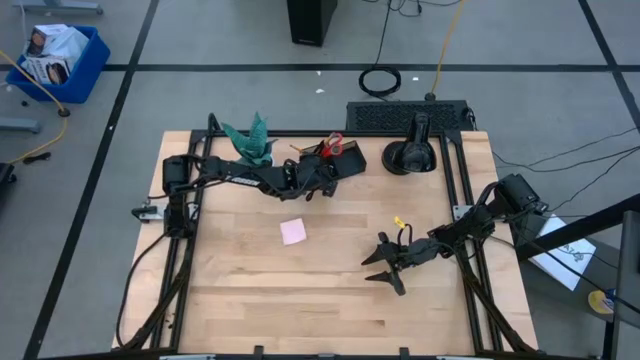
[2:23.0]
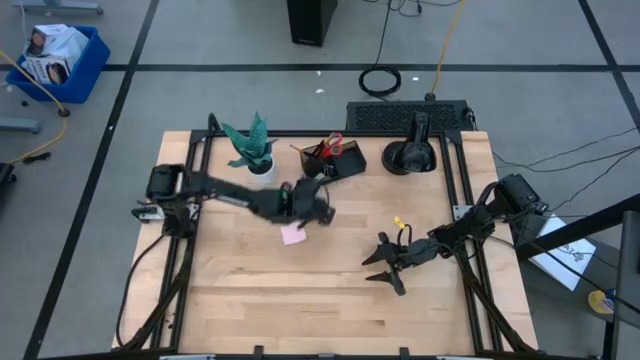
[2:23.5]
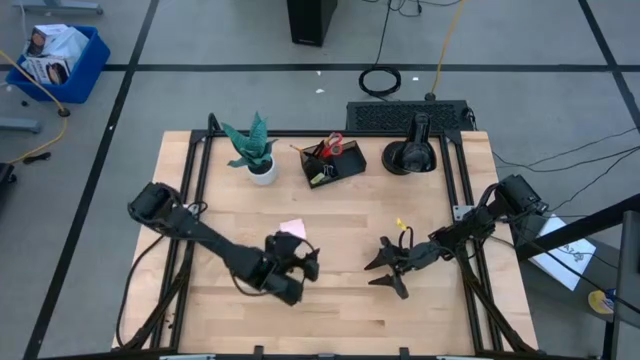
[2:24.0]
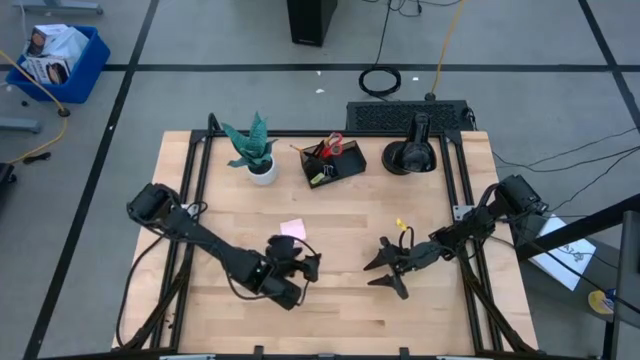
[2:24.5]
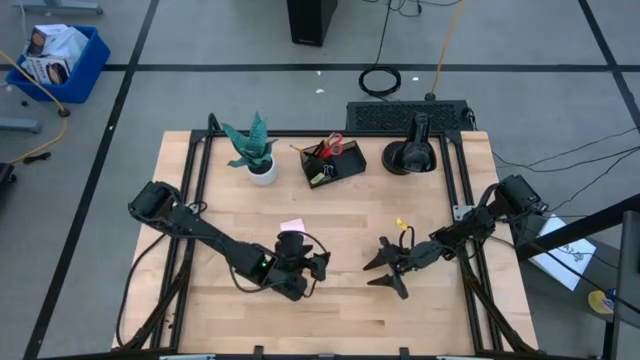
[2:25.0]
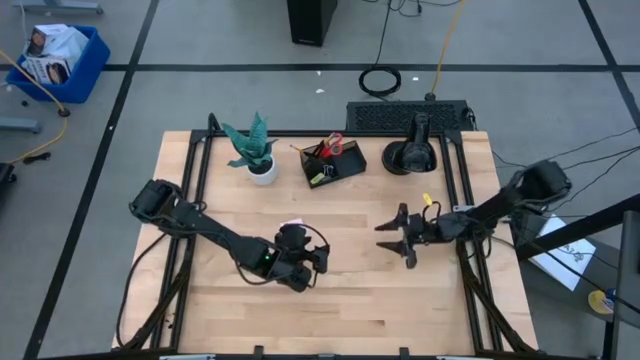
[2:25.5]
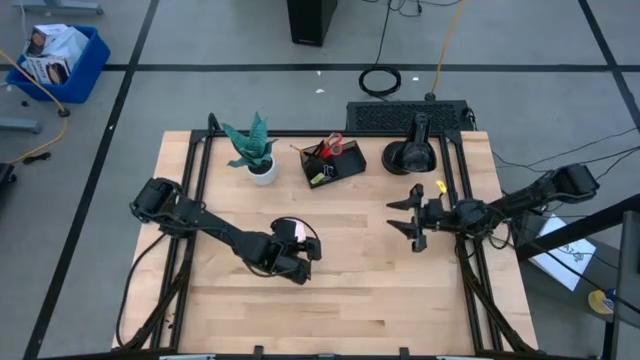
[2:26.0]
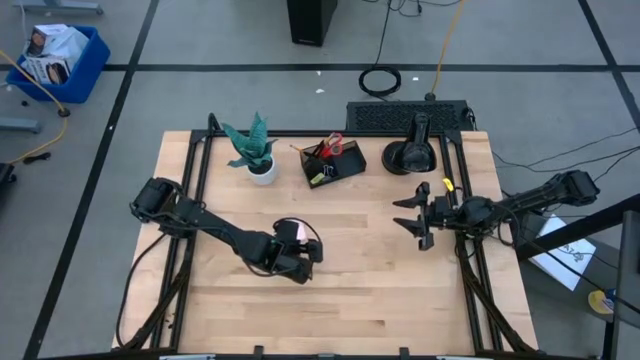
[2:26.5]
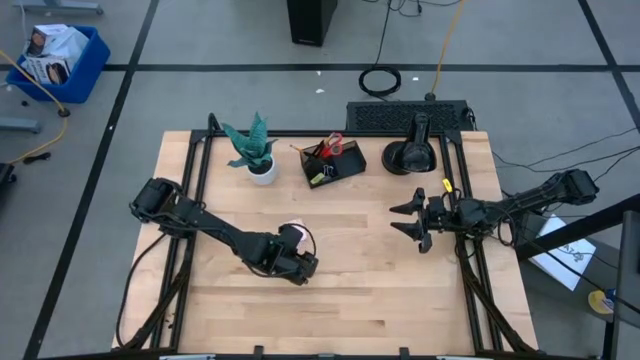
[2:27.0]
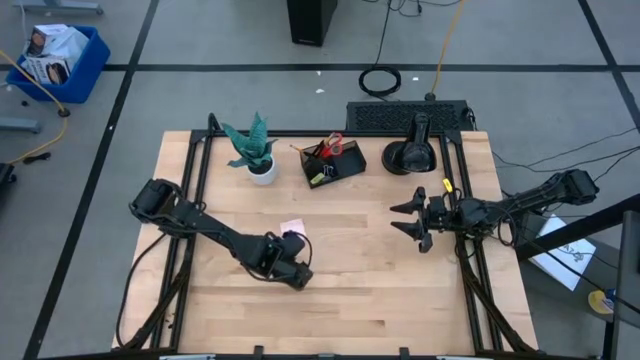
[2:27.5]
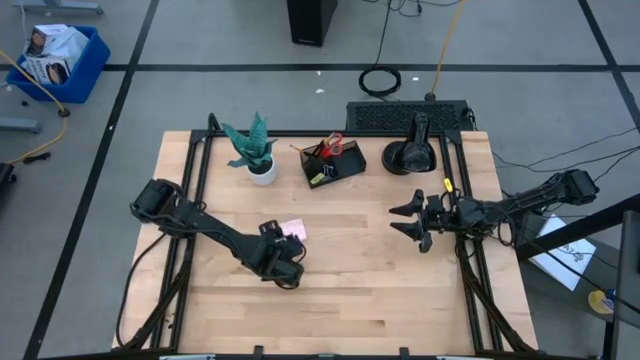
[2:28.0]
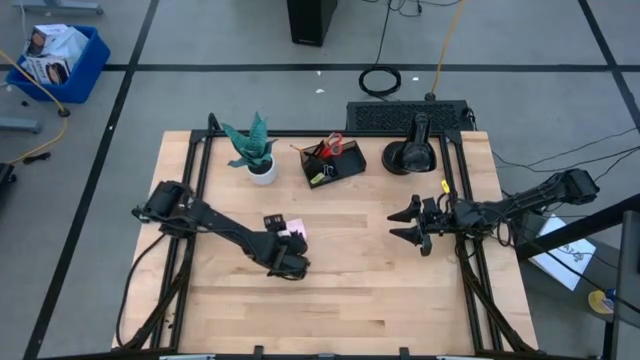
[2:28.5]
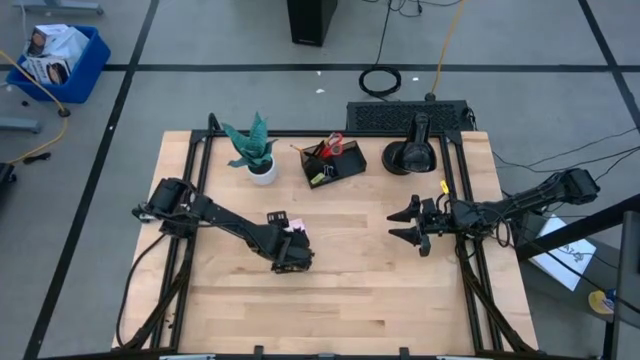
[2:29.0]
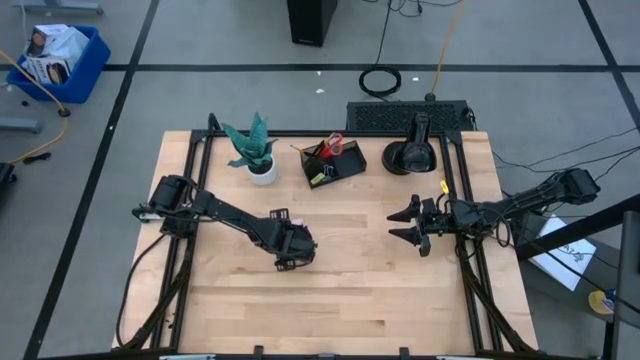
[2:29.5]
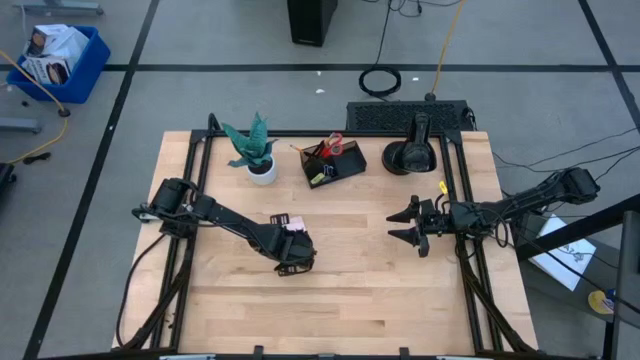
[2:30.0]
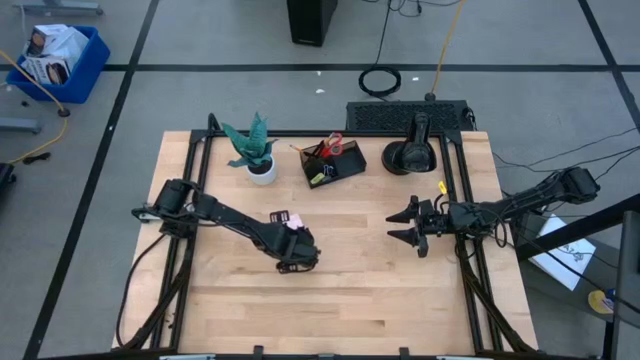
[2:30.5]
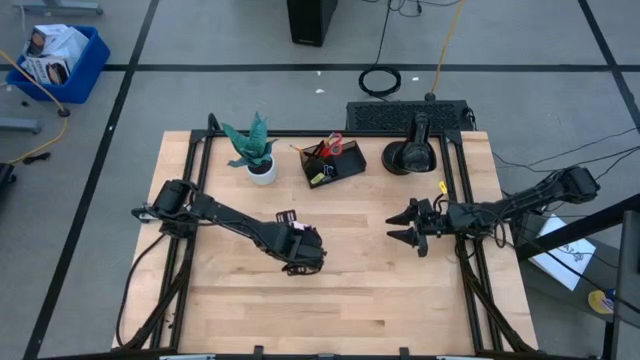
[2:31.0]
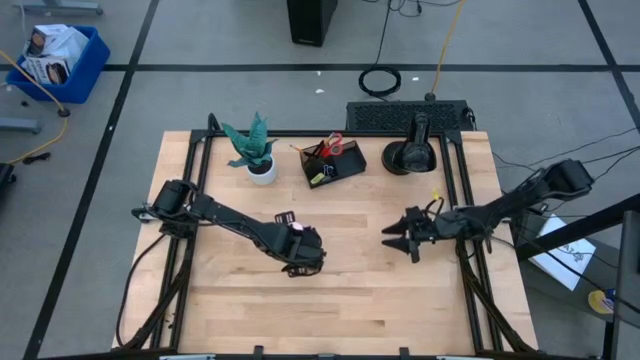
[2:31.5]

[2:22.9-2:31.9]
Task: Pick and place office supplies into organizer
Put the pink sticky notes into the black mesh desk organizer

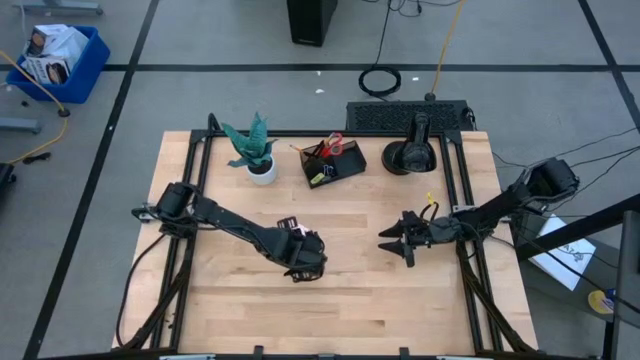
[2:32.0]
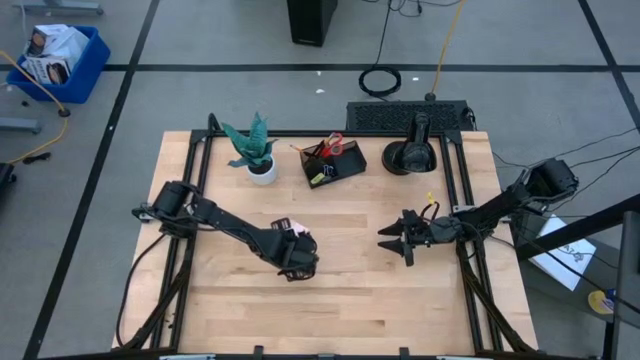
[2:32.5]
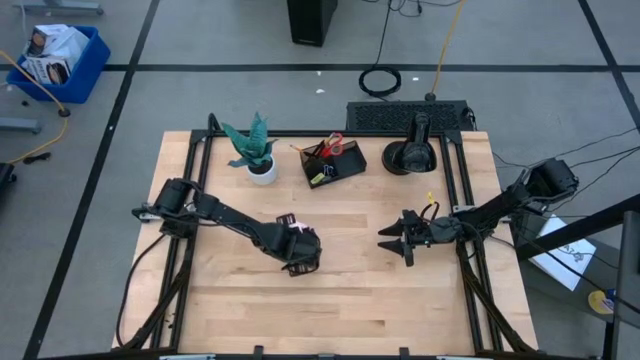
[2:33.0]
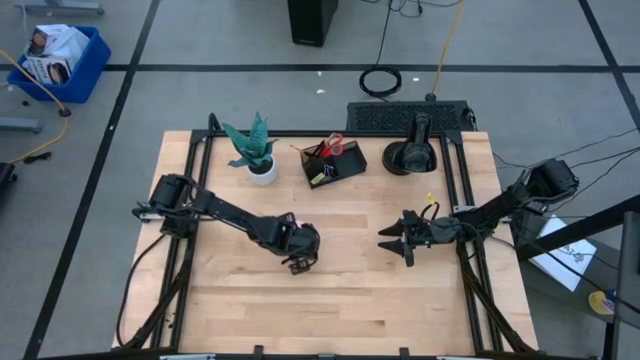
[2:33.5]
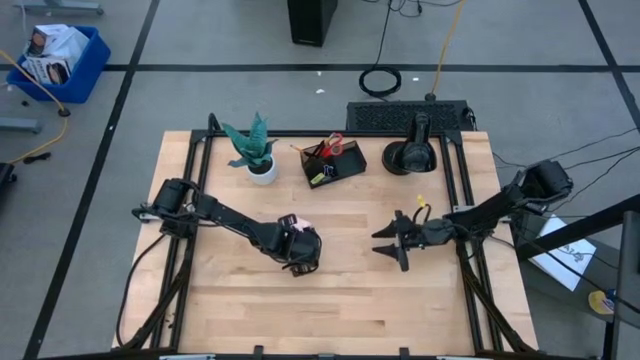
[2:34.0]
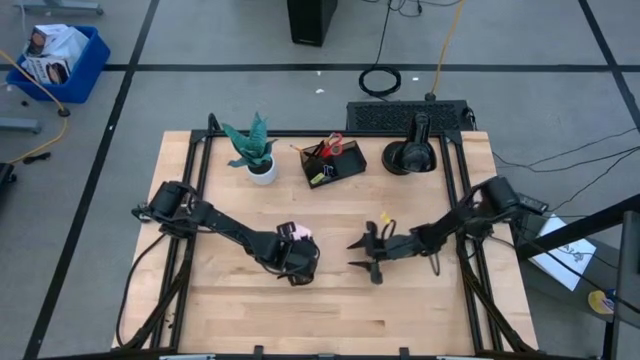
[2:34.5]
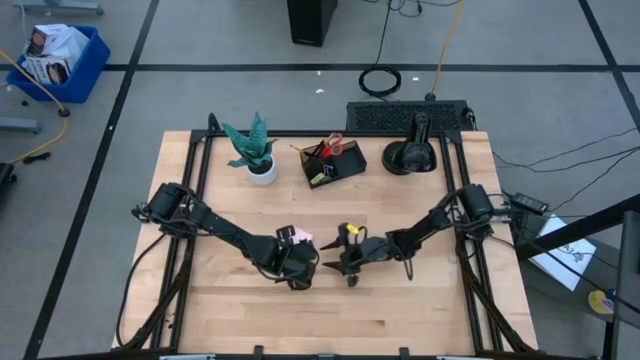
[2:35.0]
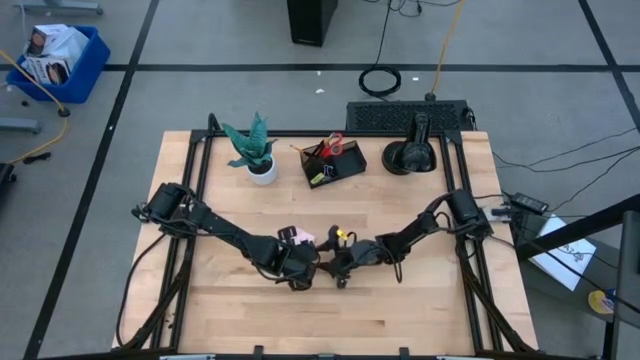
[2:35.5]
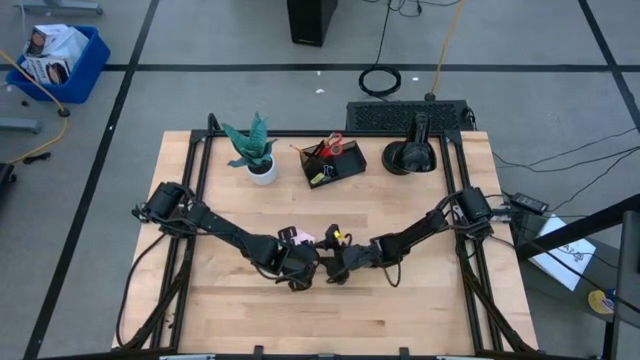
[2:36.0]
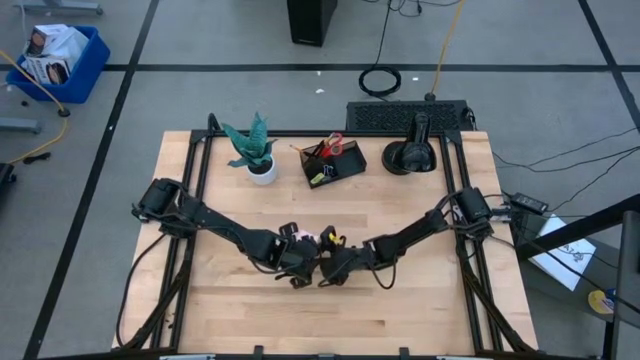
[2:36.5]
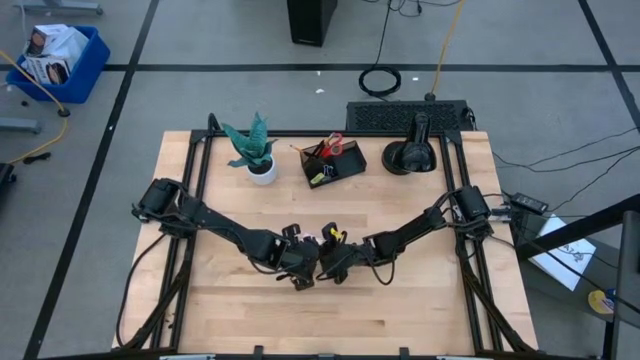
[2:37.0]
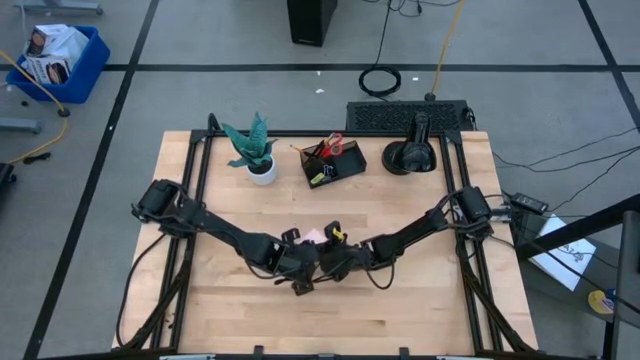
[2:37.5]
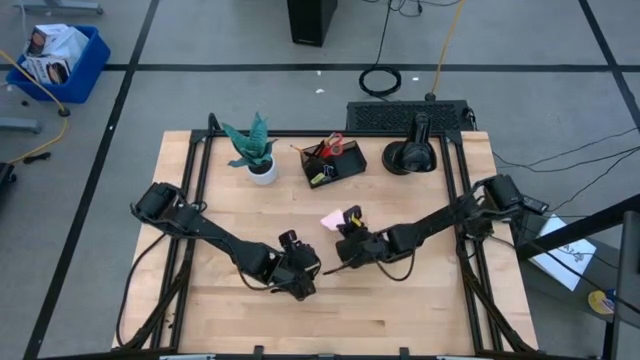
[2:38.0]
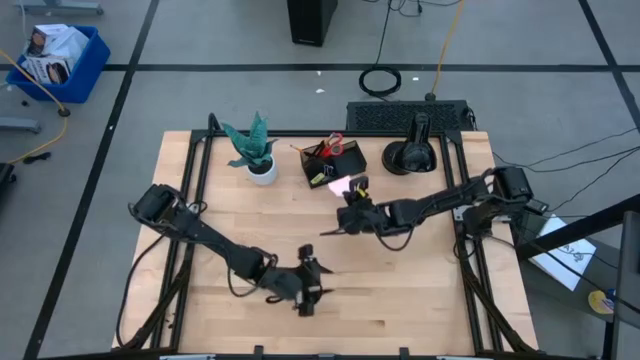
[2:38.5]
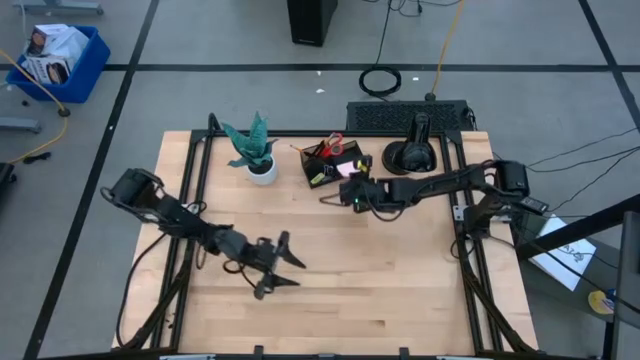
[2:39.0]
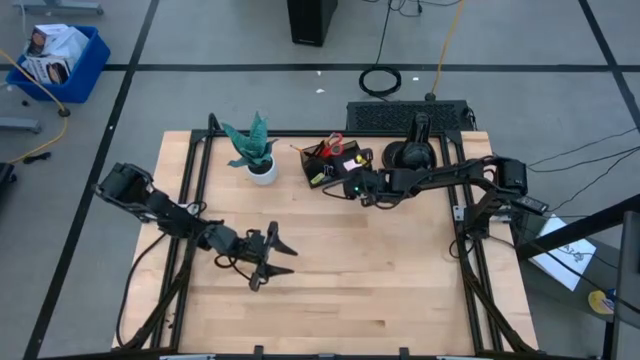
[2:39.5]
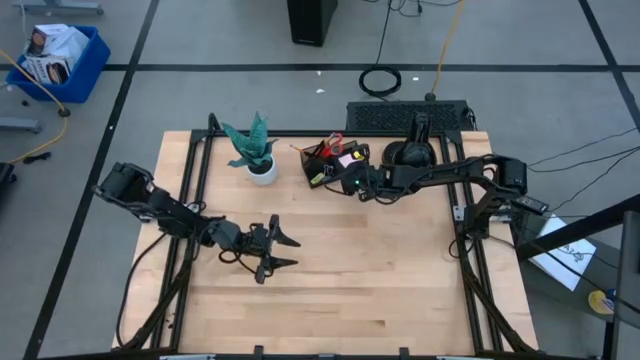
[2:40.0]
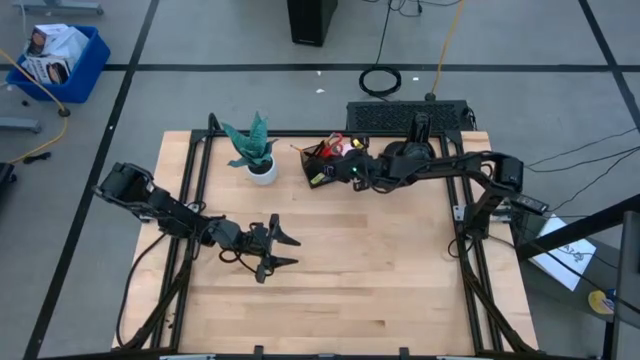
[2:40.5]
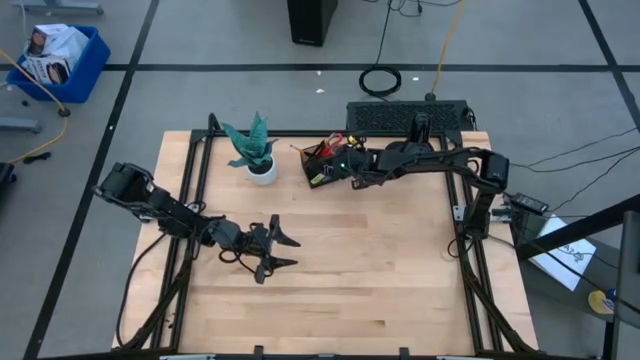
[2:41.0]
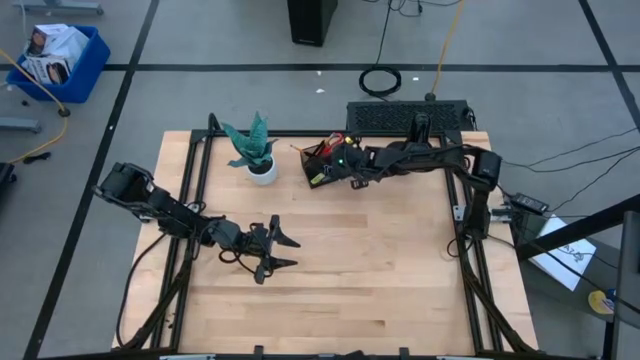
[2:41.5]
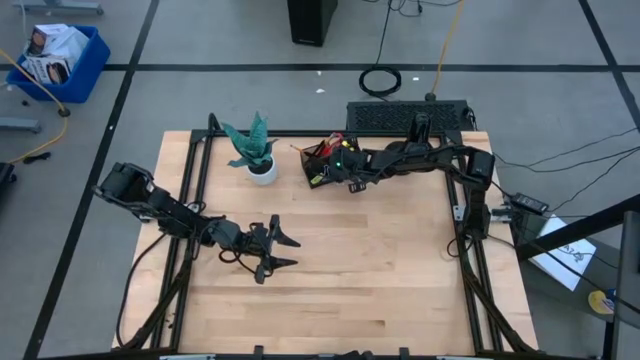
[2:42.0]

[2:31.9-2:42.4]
Put the pink sticky notes into the black mesh desk organizer

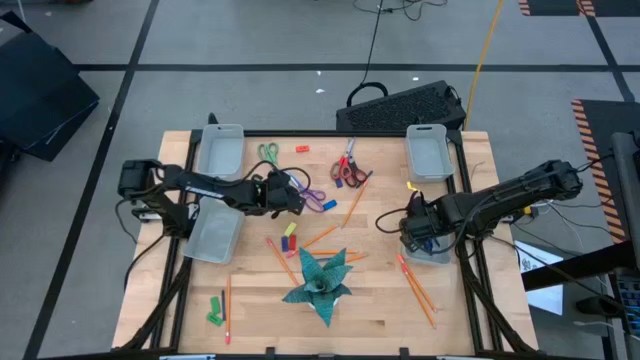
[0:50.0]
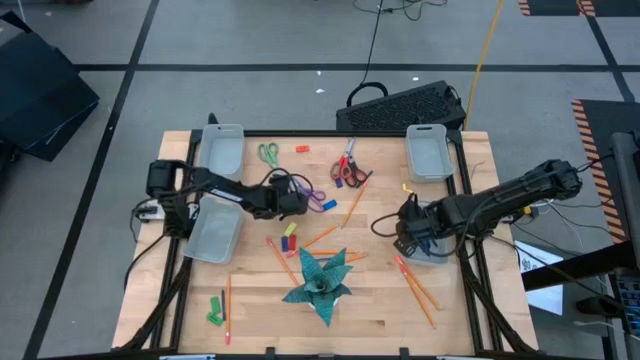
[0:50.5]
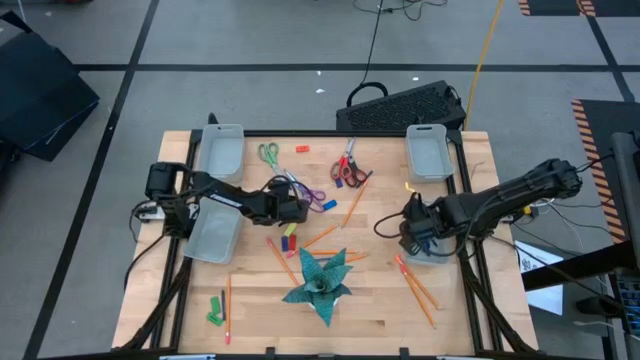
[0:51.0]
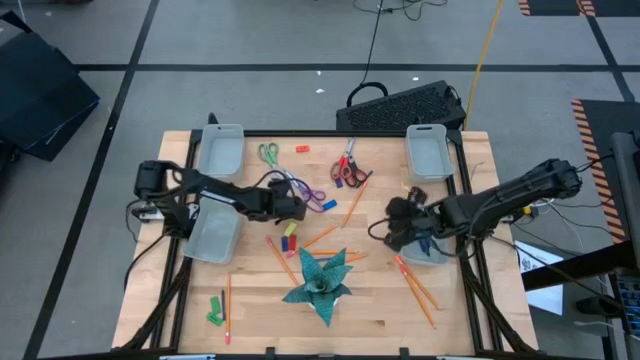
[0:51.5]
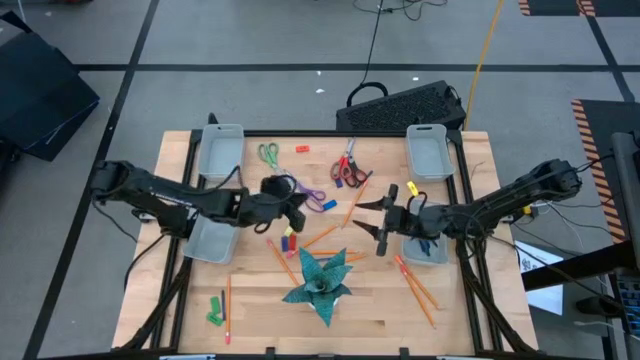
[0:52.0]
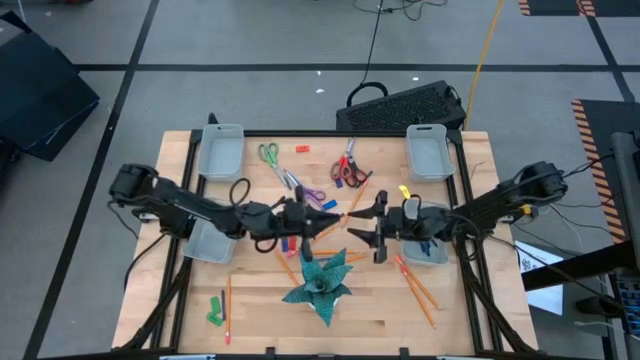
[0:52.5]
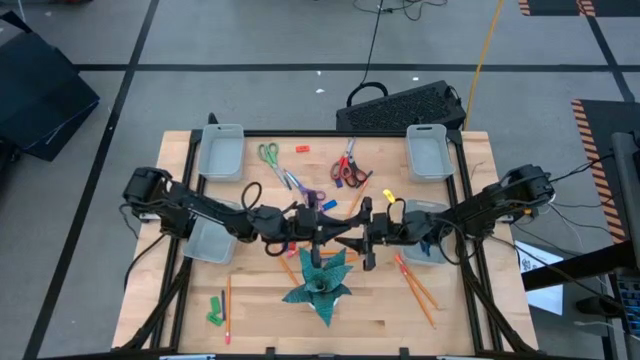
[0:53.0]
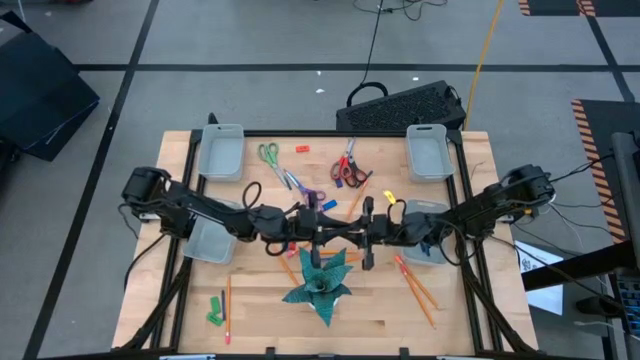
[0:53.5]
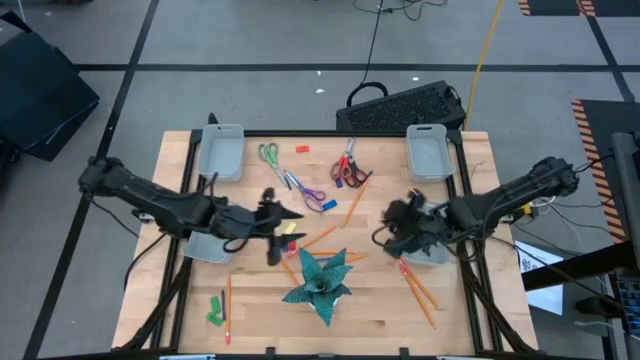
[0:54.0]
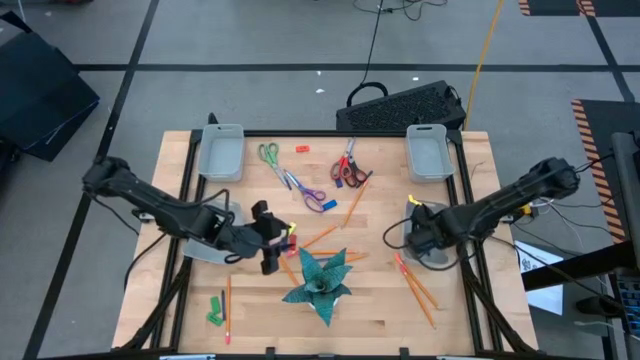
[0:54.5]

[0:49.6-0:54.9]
Task: Sort crayons/erasers/pens/pencils in bins
Put the blue crayon into the bottom right gray bin
